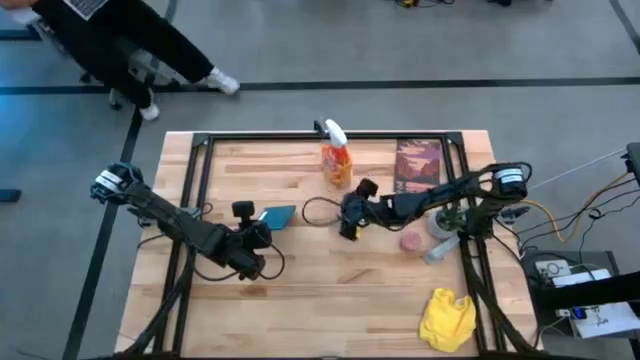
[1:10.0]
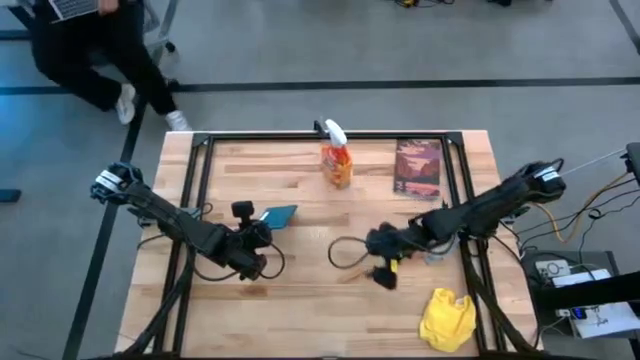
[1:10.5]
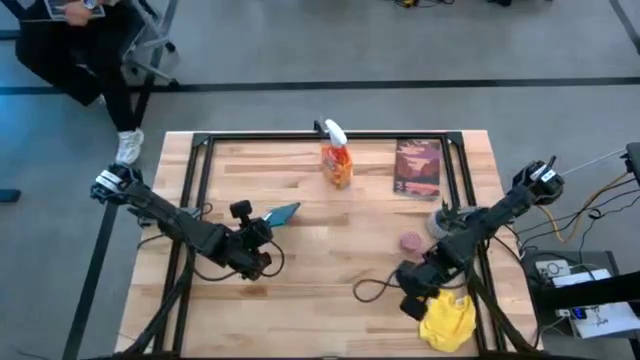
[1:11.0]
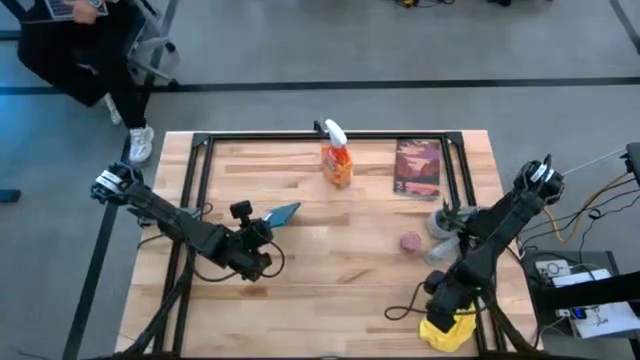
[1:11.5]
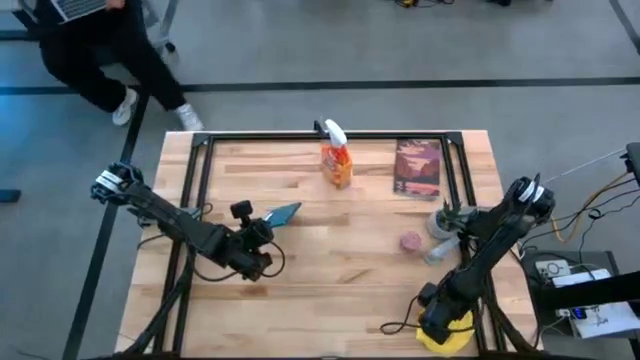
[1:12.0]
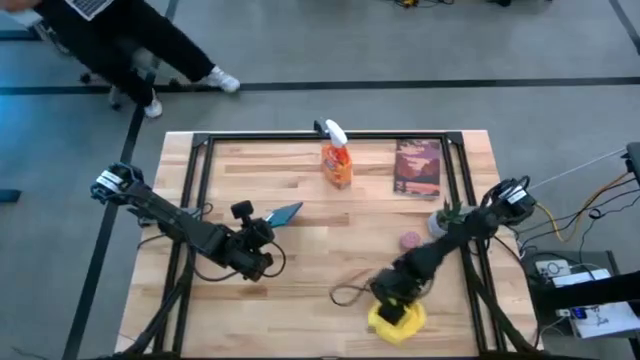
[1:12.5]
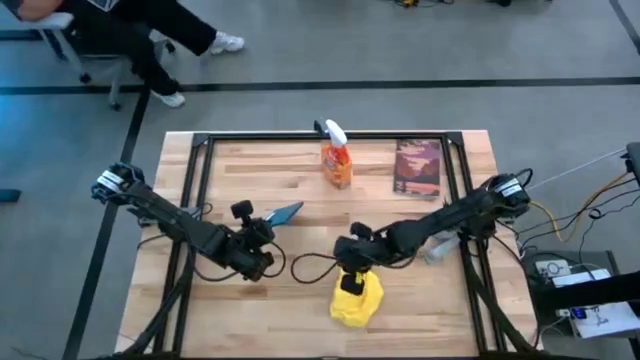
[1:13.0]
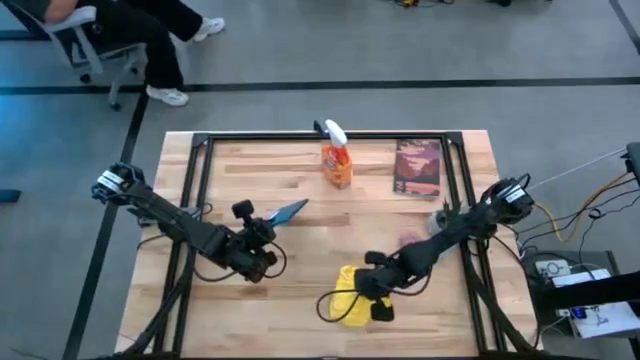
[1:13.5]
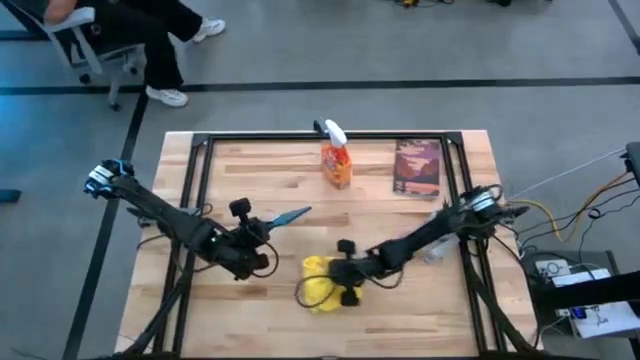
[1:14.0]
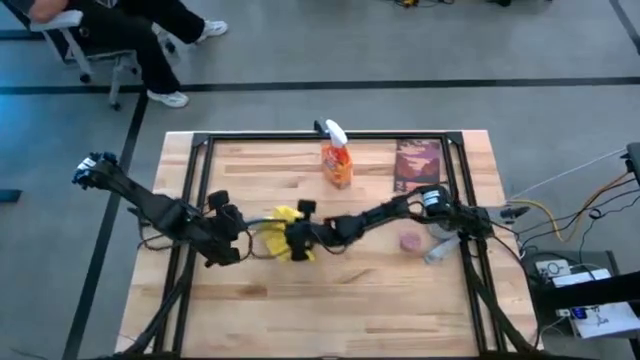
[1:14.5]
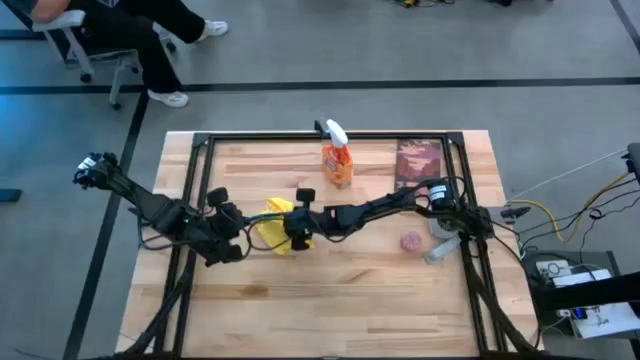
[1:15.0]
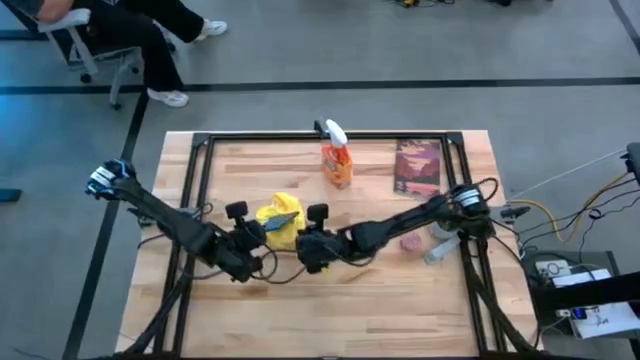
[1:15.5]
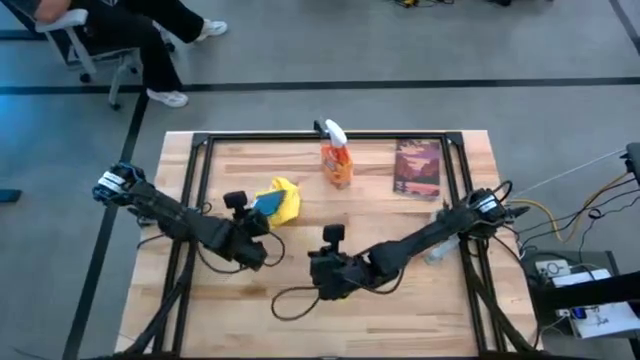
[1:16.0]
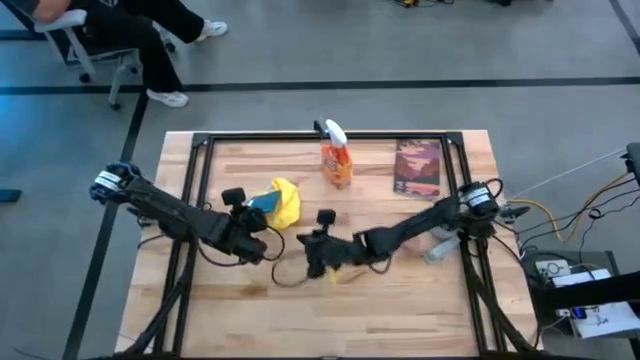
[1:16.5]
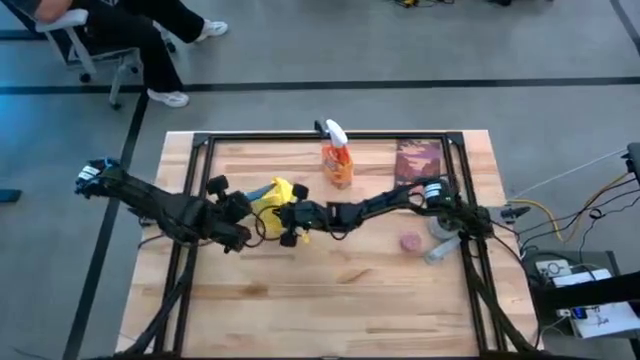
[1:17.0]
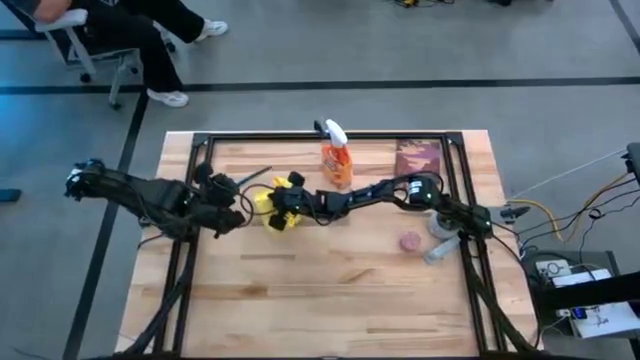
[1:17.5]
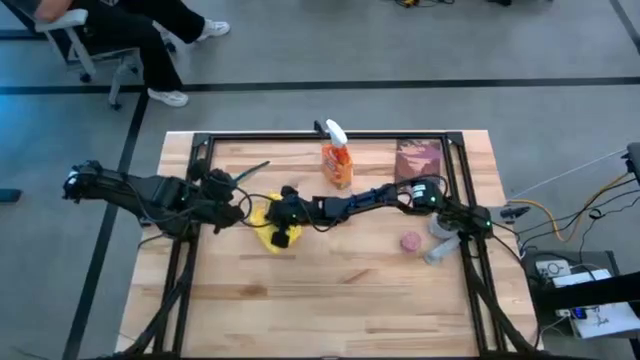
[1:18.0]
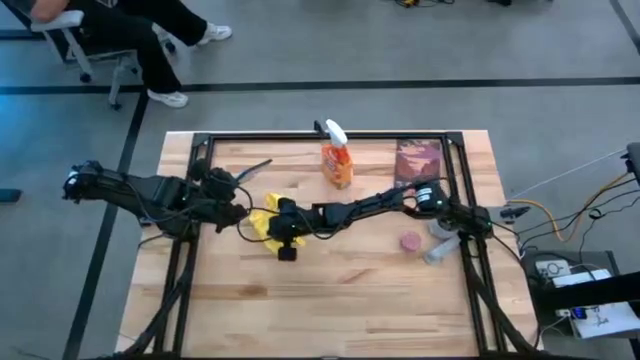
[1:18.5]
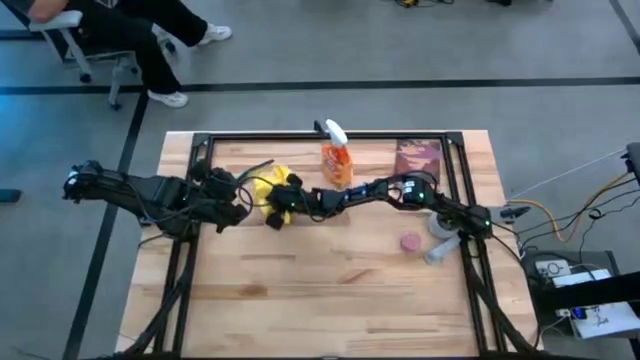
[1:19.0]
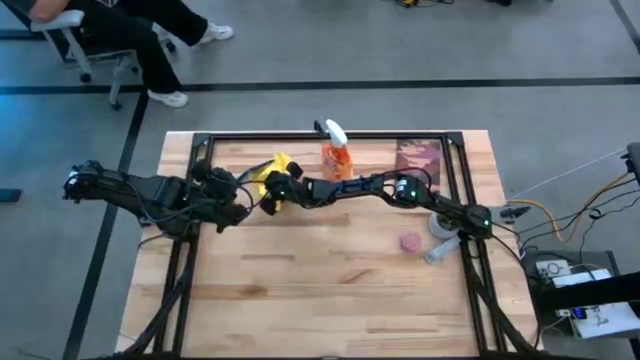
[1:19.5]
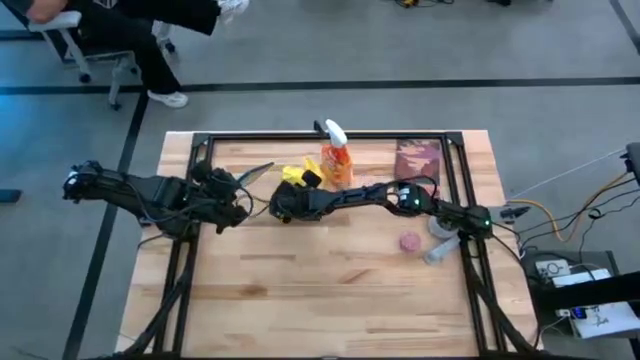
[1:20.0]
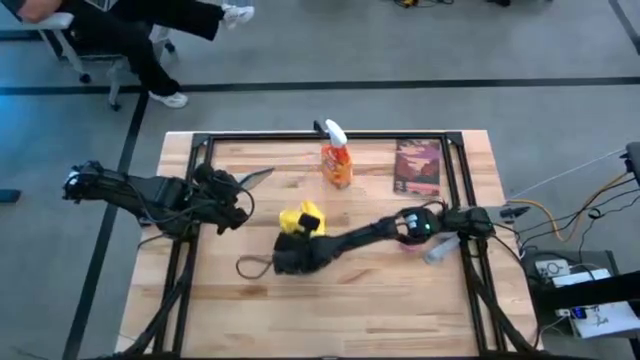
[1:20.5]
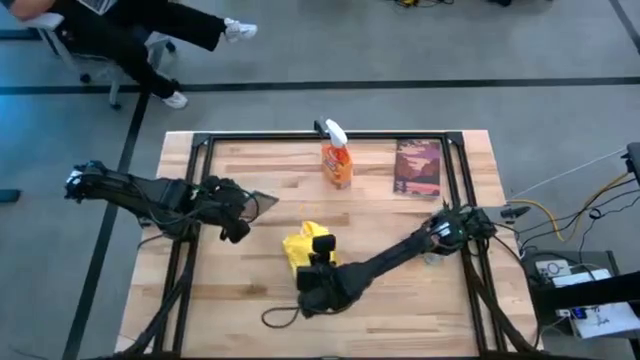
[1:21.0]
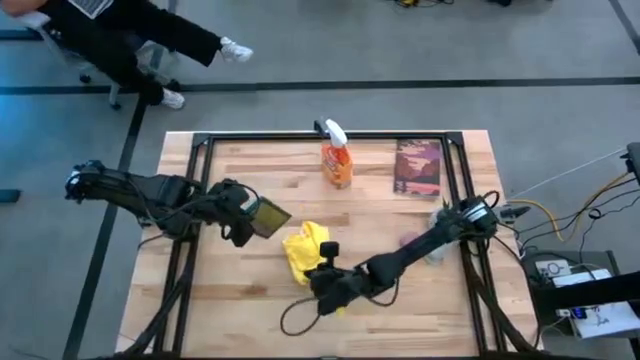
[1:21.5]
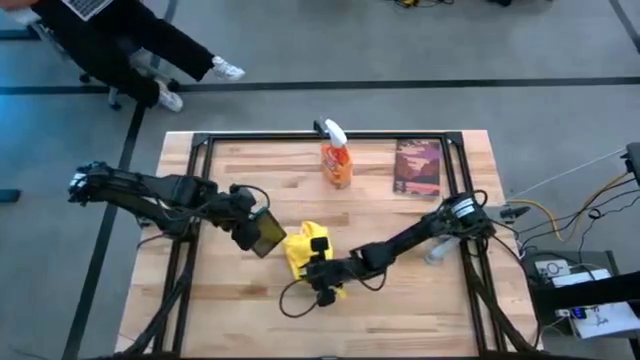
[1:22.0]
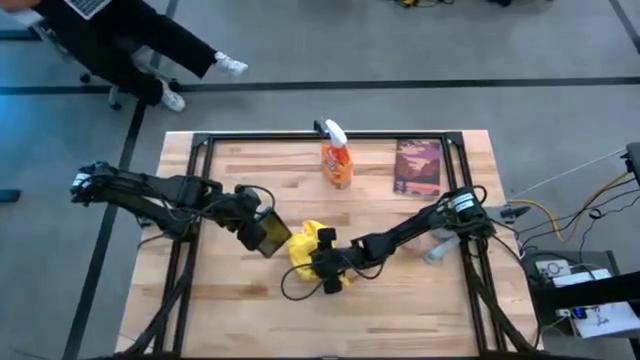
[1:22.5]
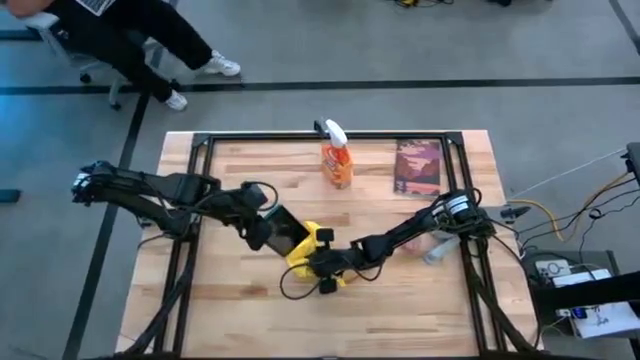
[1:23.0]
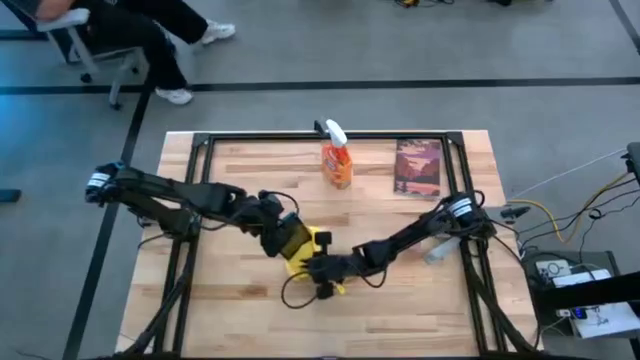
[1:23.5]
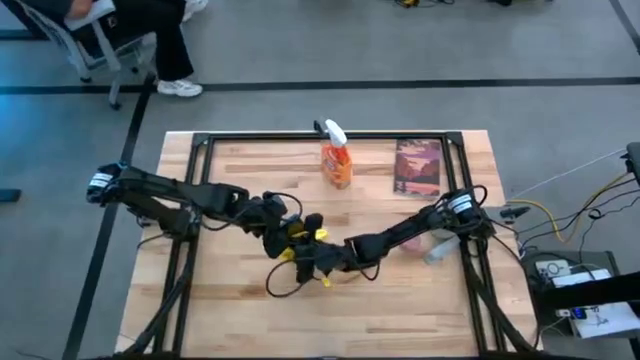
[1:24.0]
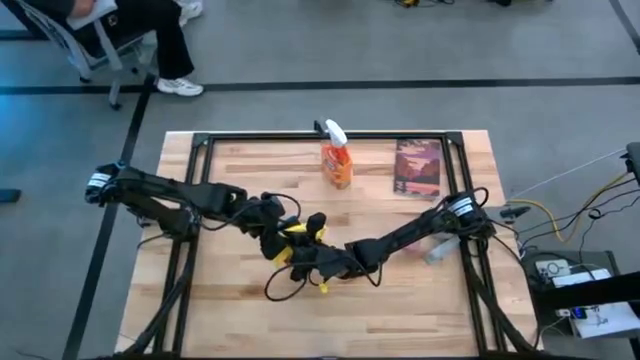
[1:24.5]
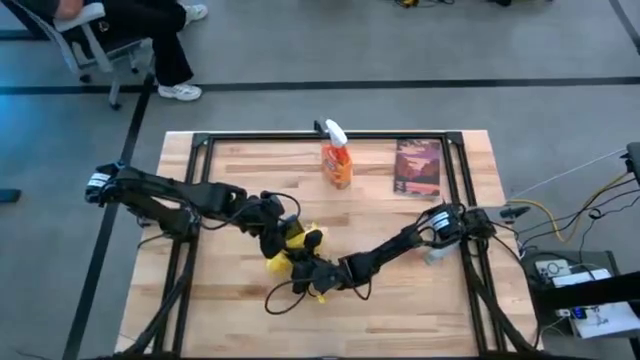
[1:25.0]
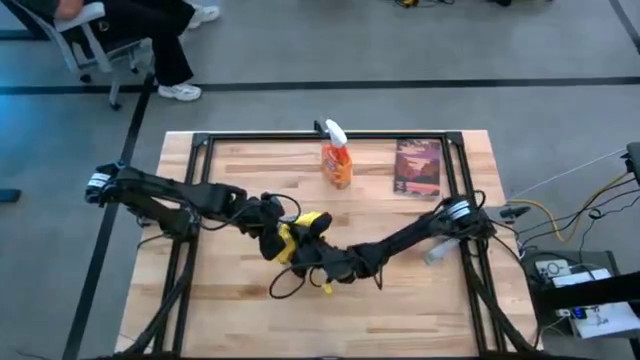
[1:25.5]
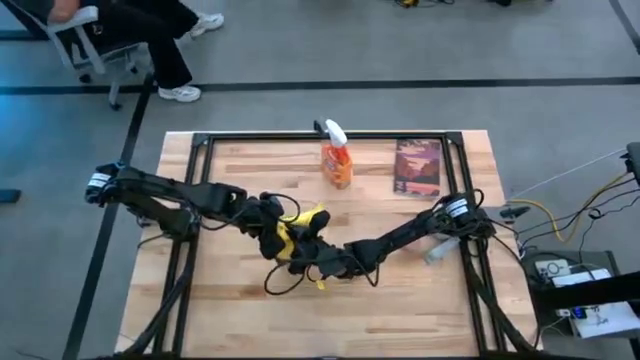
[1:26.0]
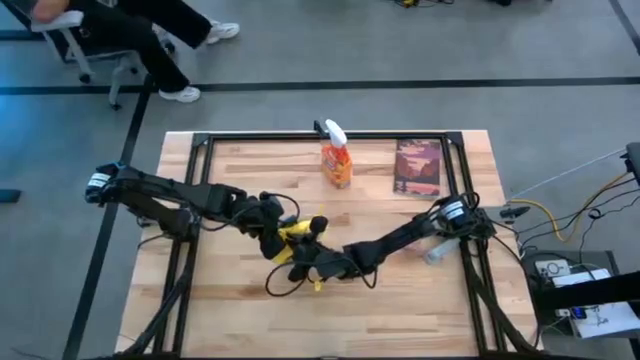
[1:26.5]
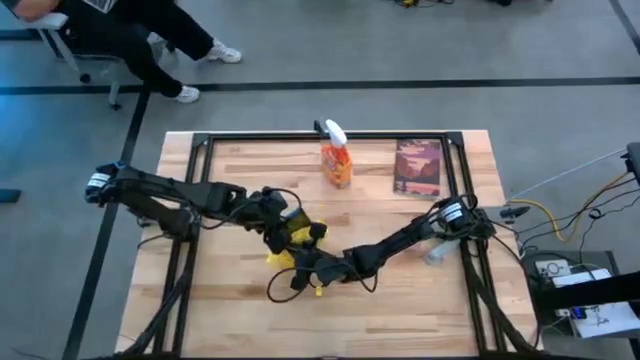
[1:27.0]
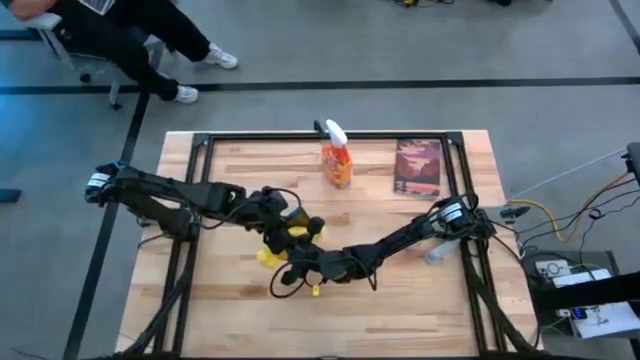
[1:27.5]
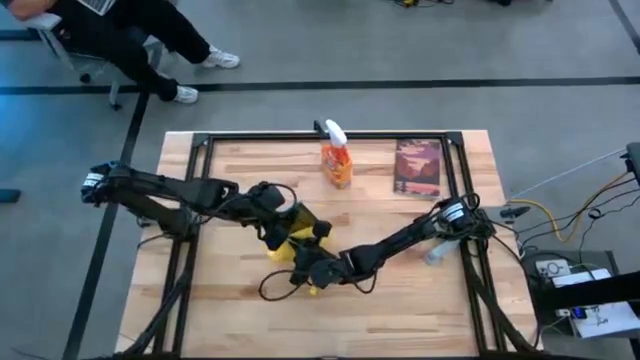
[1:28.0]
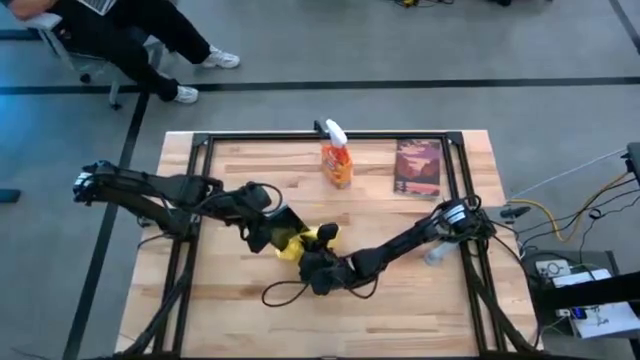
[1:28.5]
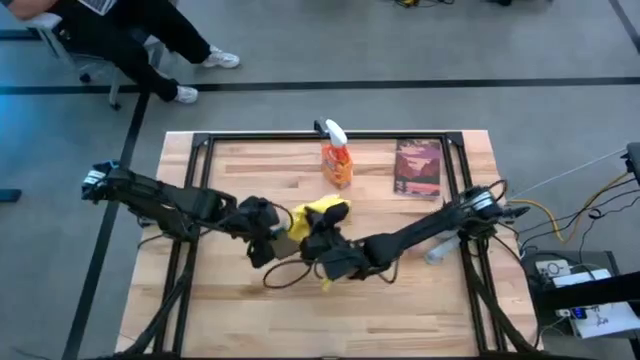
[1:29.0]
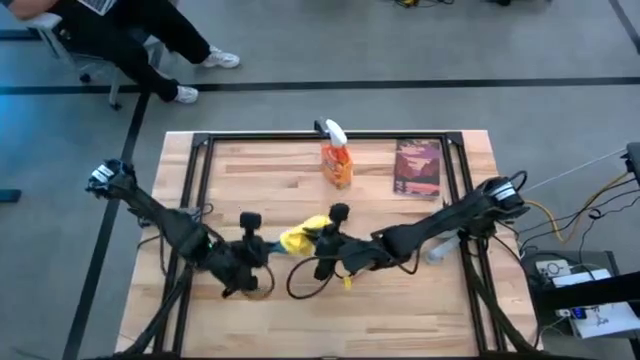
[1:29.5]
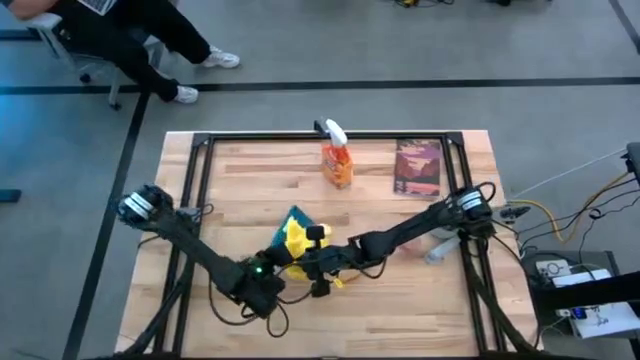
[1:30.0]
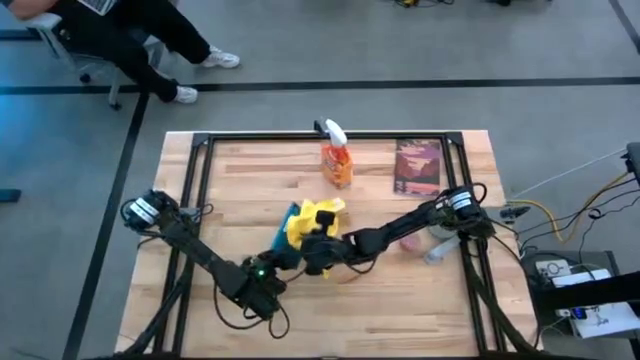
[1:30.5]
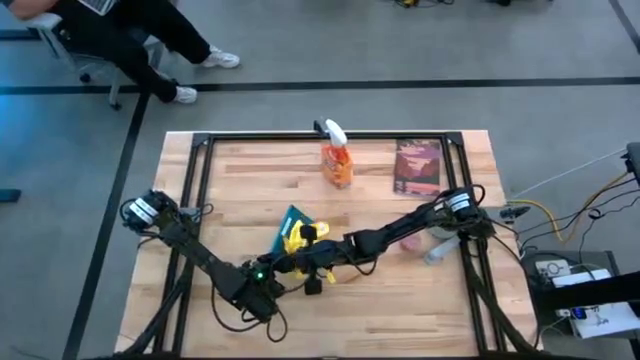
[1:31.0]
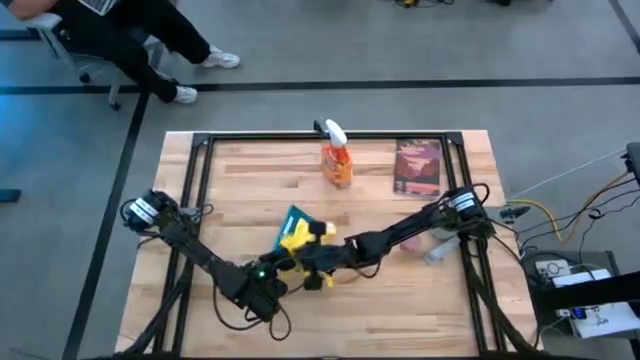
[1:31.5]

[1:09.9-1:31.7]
Task: Apply microfiber cloth
Wipe the front and back of the tablet with the yellow microfiber cloth
